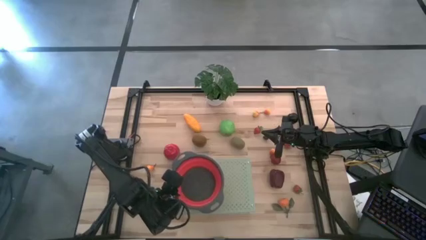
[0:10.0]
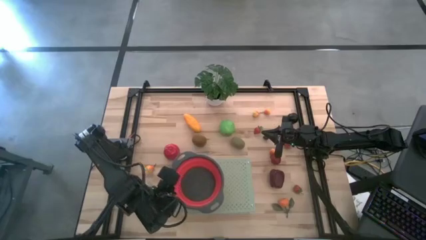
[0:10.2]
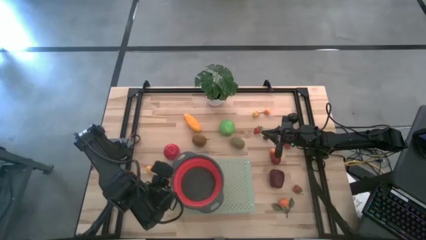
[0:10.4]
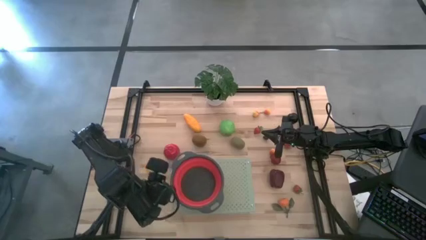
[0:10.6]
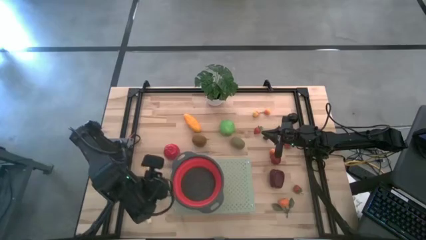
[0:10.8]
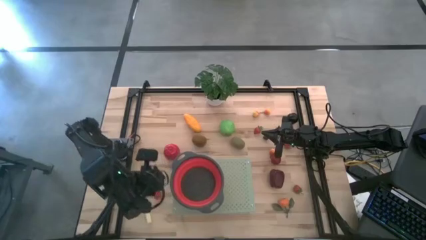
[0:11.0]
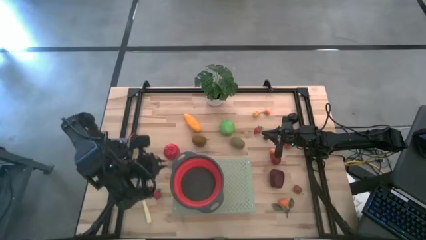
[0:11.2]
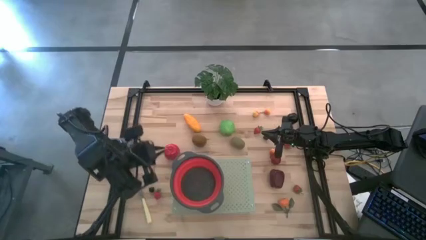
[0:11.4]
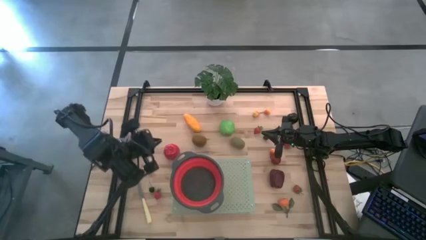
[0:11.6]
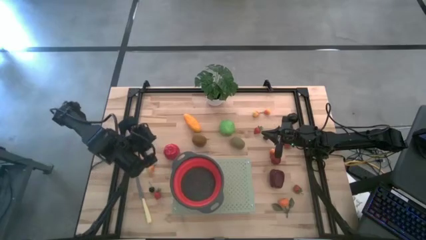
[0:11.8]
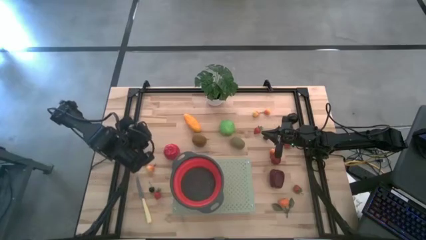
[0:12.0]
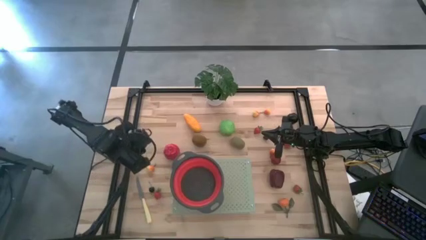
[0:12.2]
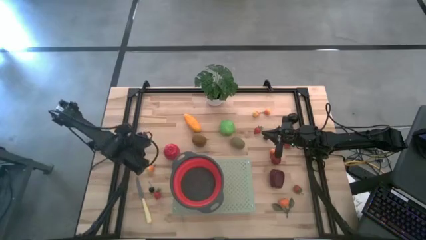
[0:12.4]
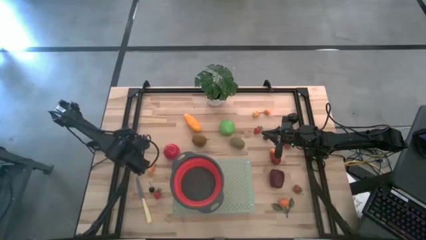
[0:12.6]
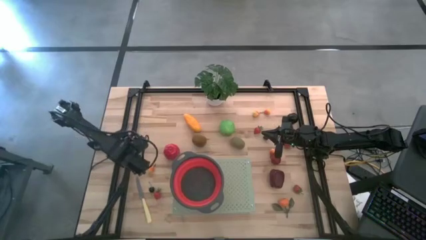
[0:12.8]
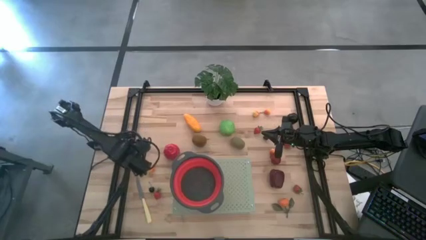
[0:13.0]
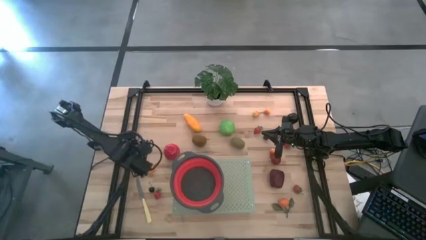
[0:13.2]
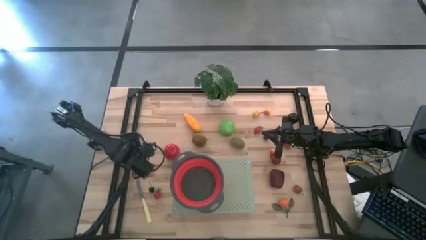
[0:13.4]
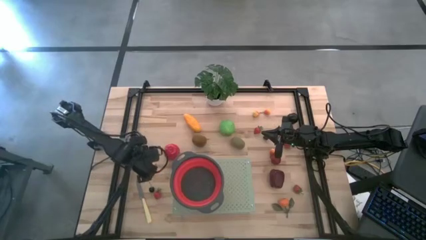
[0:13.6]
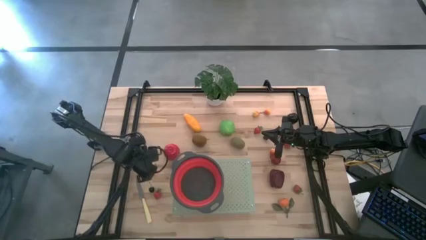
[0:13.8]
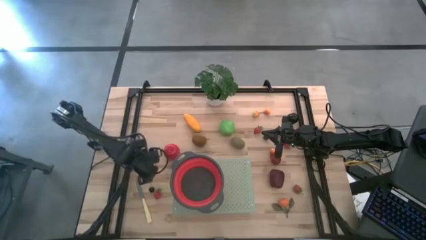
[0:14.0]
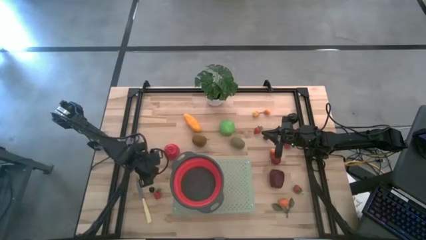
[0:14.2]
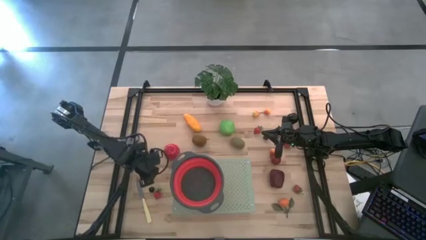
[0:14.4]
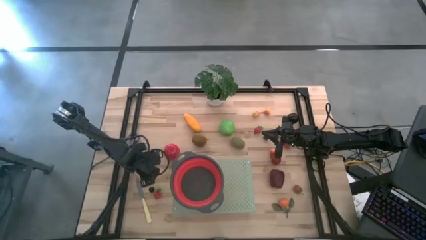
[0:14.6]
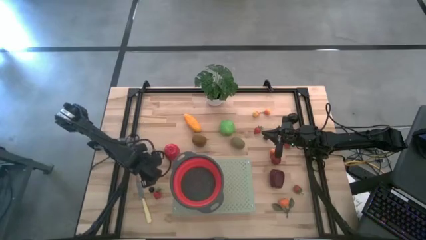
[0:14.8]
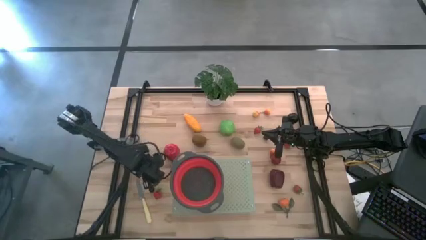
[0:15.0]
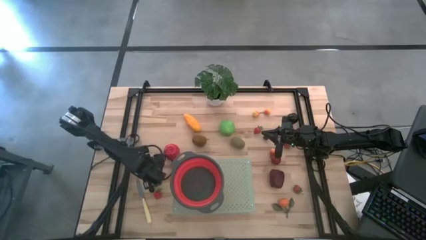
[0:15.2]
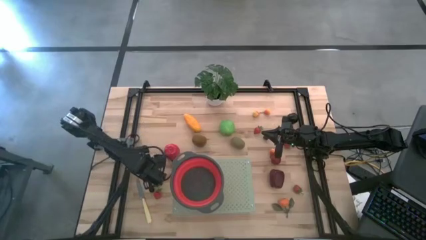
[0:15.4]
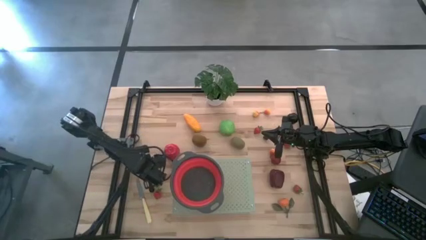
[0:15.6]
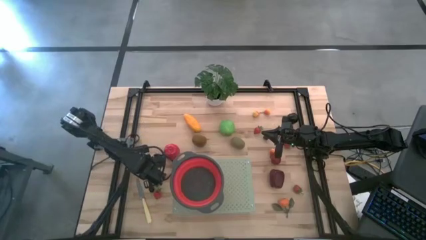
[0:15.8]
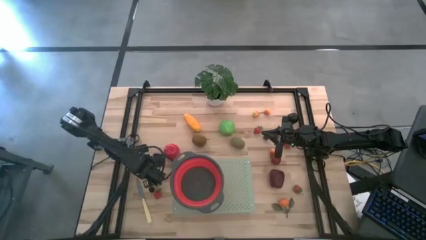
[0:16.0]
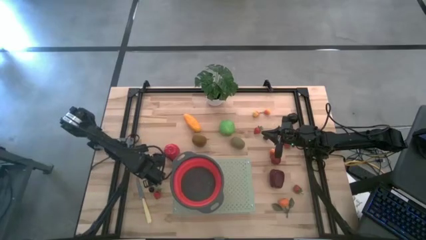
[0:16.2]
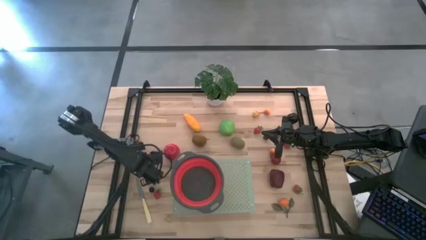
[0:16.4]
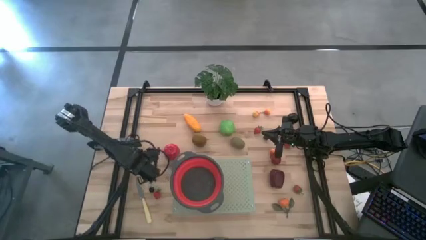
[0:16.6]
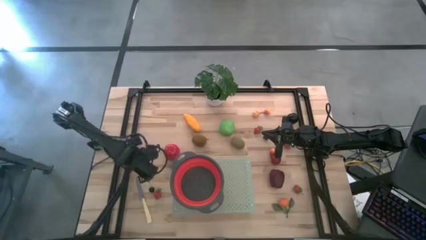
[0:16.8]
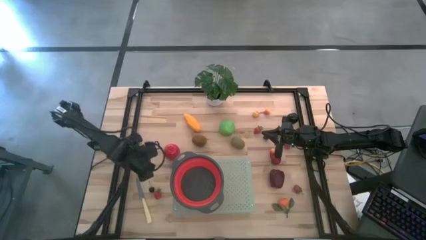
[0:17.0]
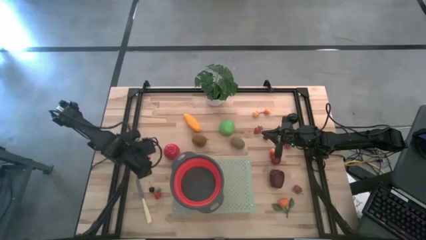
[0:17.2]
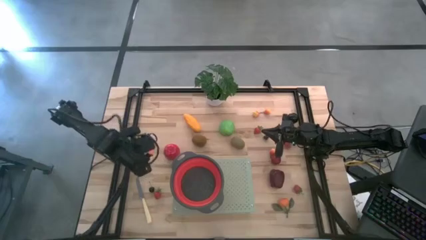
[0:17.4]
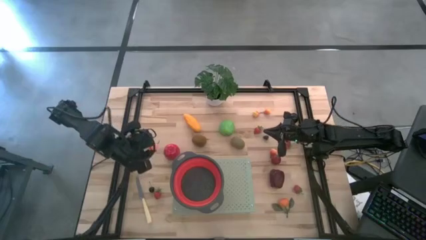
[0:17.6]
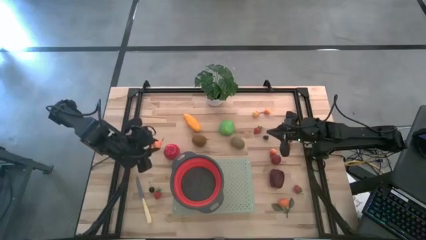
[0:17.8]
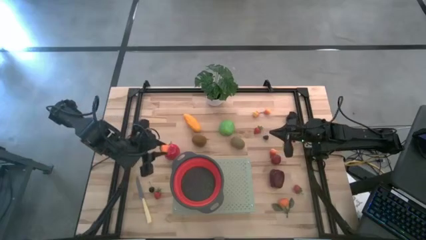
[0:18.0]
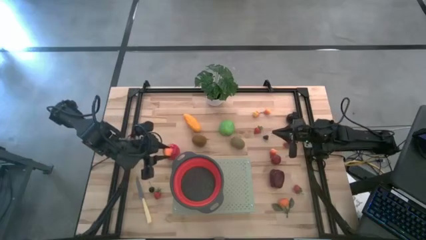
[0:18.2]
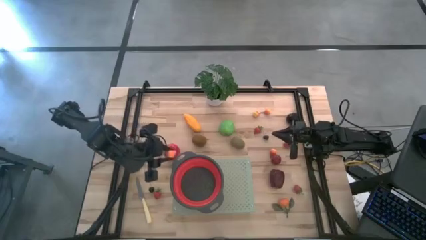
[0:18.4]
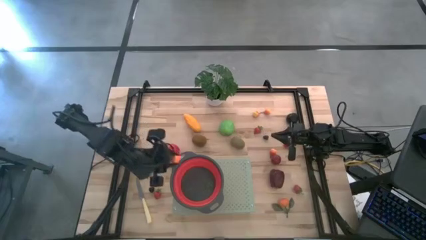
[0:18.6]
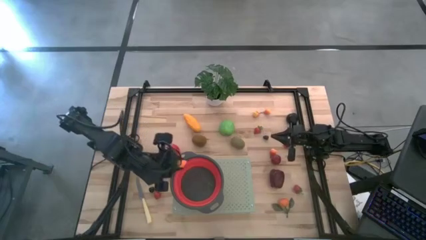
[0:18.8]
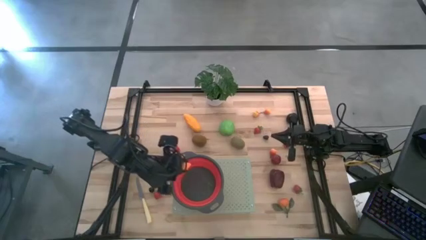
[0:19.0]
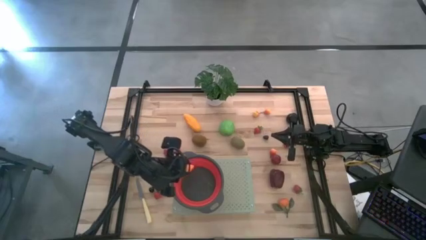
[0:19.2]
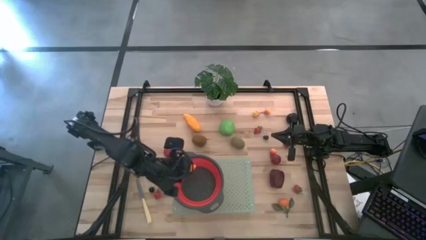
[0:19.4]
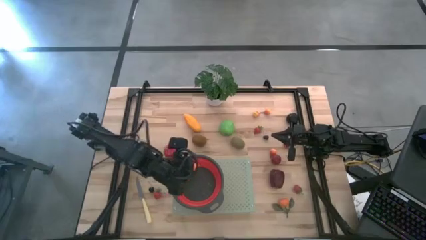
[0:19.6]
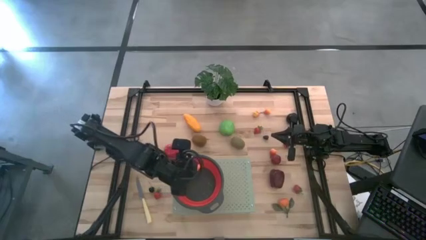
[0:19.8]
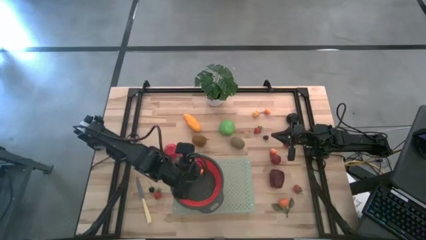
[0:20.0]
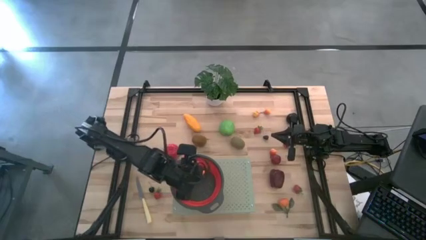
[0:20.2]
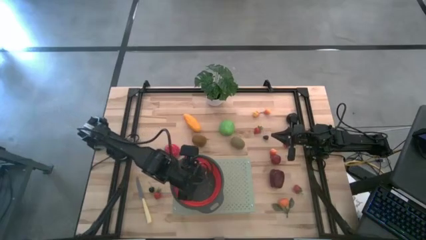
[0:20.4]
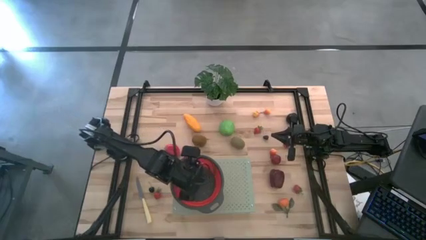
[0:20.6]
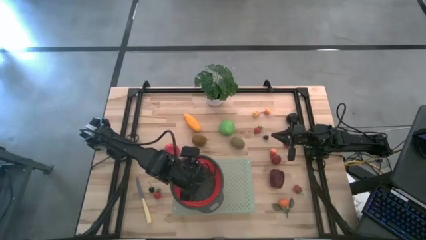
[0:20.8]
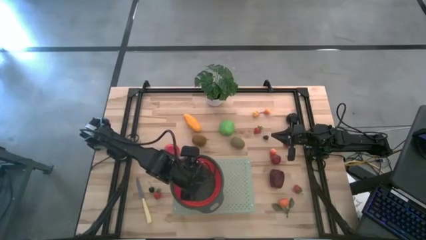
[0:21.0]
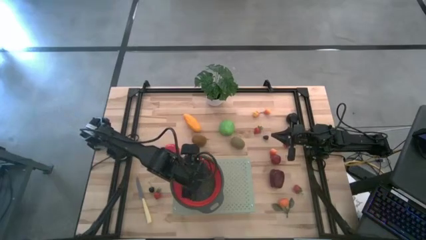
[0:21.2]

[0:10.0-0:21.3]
Task: Pick & Place Fruit
Put the pear into the red strainer

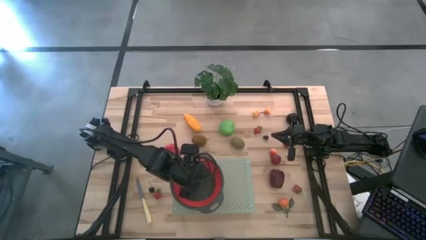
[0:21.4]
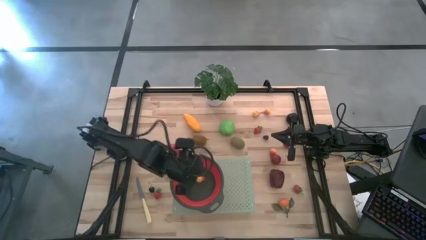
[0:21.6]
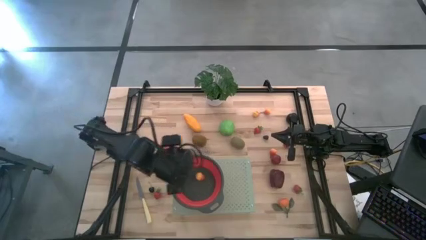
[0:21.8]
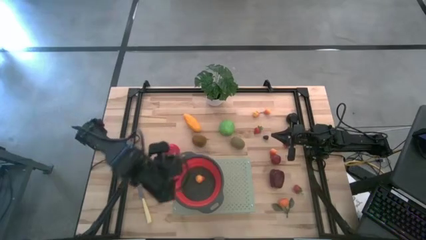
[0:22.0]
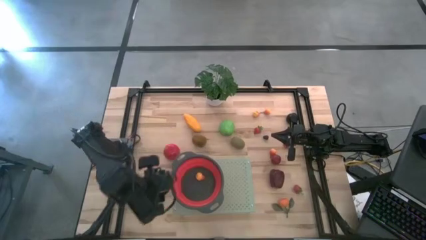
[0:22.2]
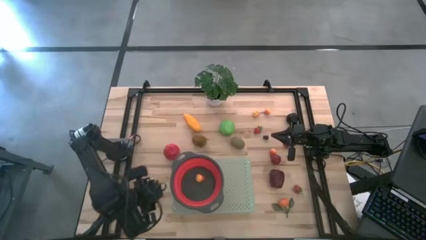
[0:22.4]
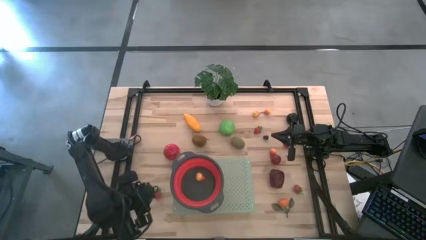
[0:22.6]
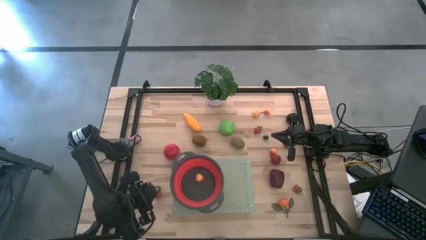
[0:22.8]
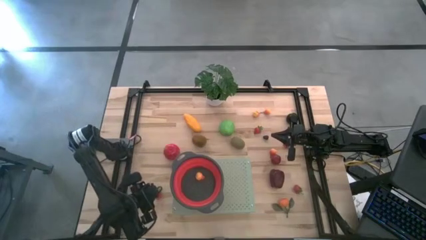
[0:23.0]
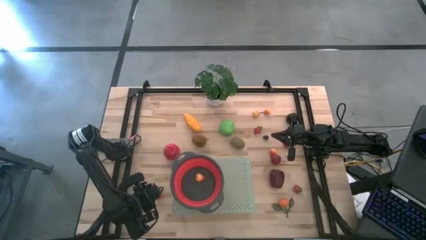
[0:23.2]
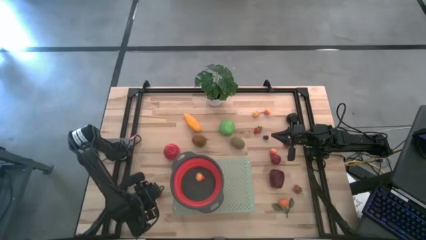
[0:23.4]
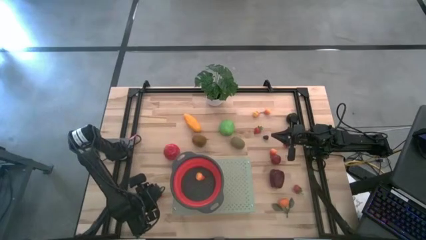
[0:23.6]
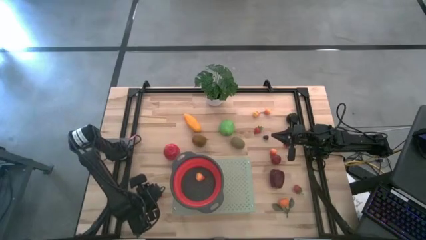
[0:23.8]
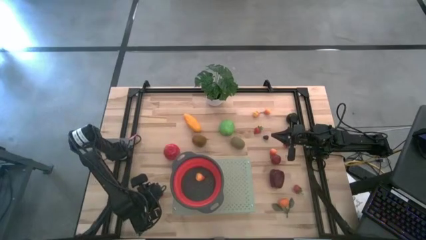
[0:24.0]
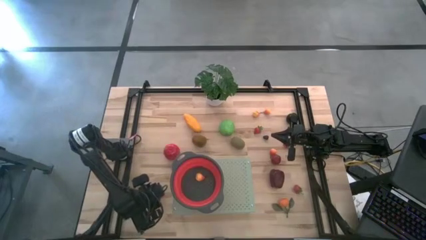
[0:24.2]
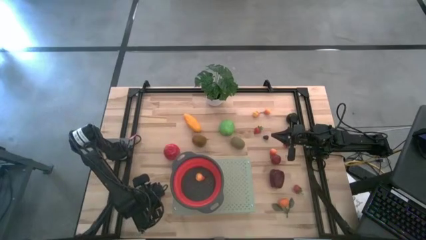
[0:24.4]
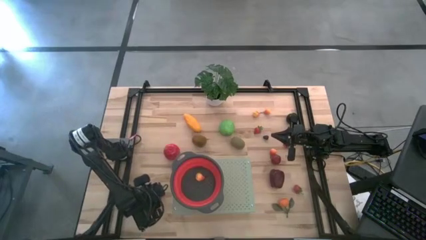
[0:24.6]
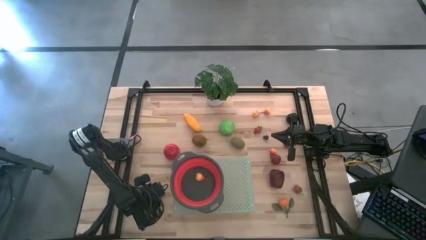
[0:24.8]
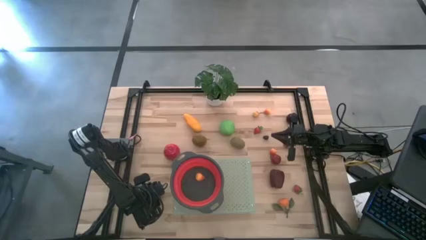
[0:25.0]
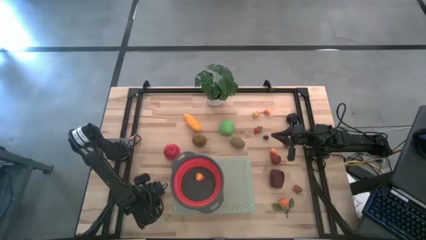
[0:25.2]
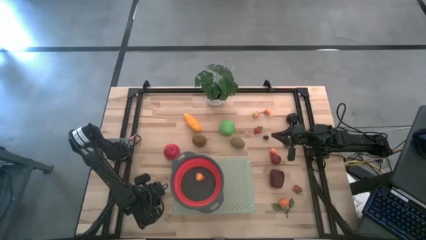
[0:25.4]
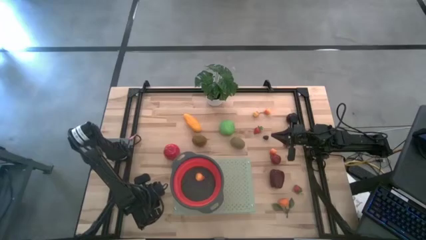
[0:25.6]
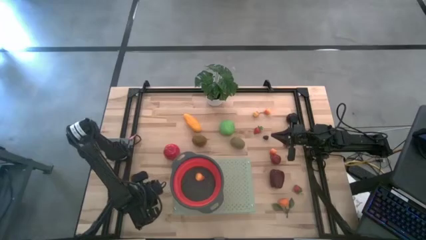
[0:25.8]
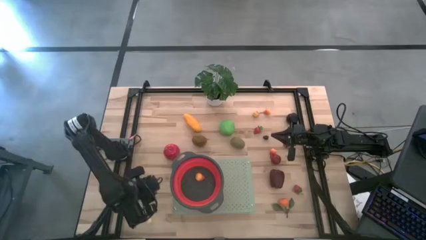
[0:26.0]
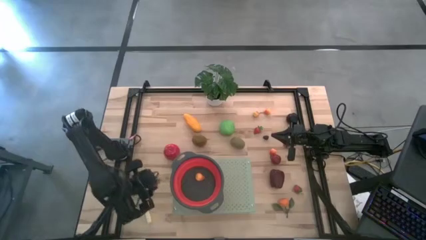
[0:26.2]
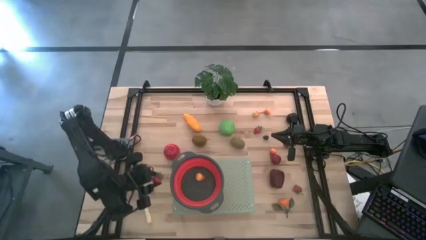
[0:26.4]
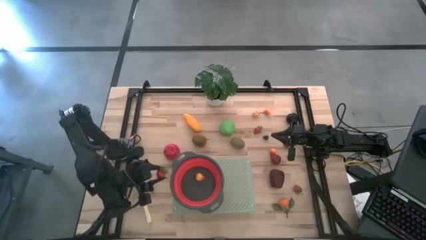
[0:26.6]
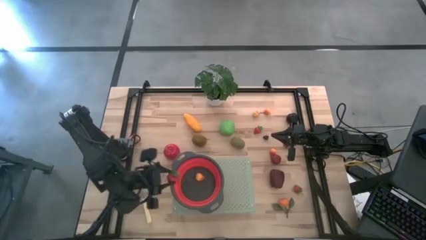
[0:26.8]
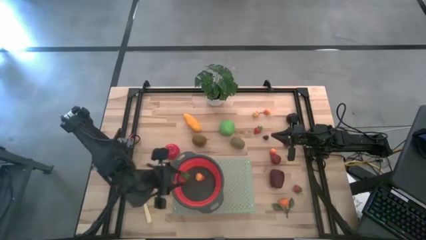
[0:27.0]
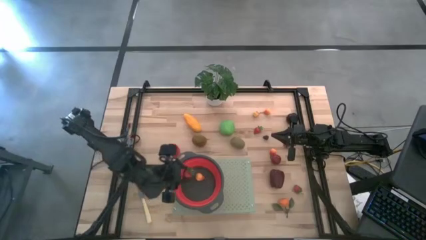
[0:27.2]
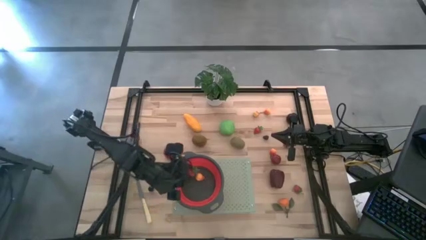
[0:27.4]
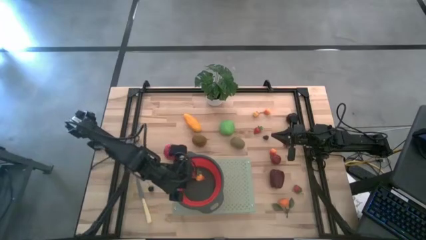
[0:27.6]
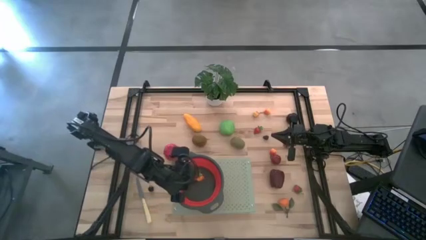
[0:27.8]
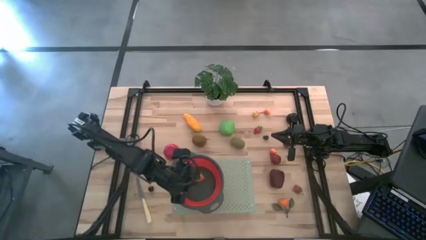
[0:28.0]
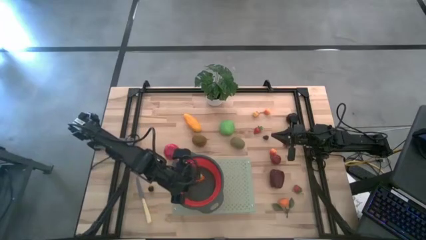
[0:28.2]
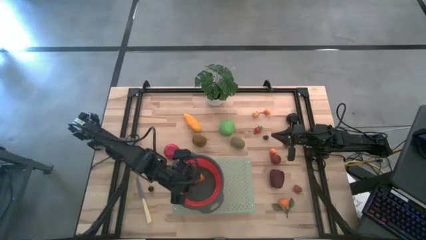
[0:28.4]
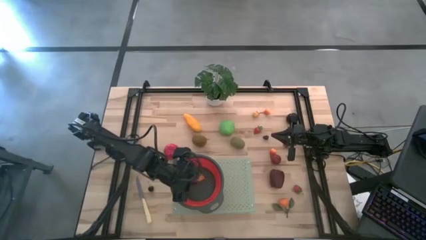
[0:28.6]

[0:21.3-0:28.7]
Put the strawberry into the red strainer
